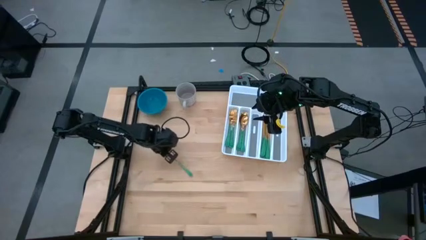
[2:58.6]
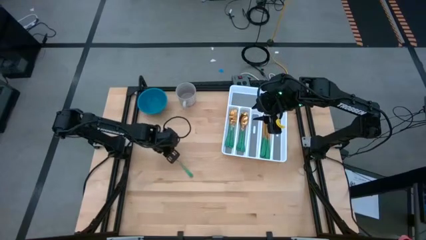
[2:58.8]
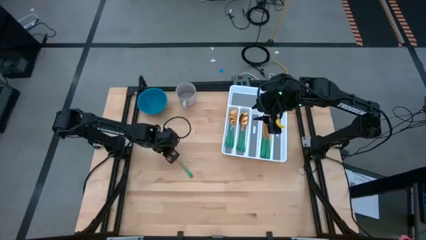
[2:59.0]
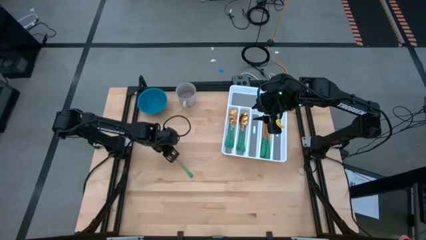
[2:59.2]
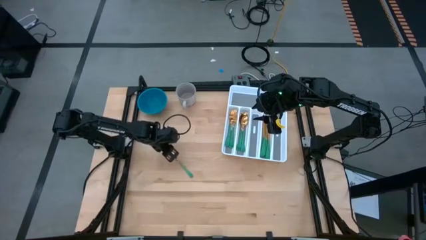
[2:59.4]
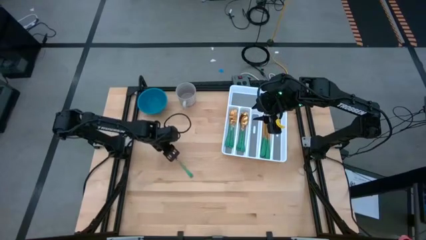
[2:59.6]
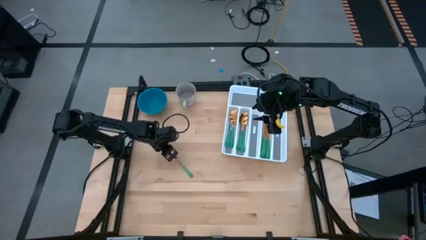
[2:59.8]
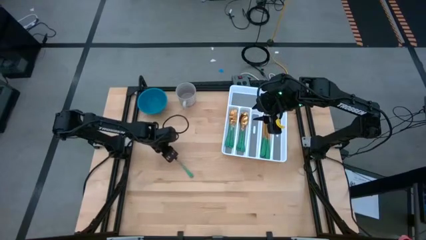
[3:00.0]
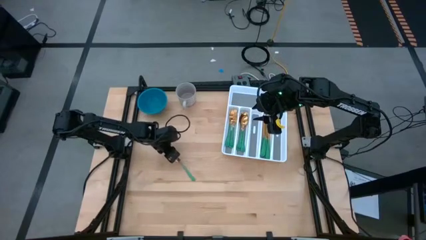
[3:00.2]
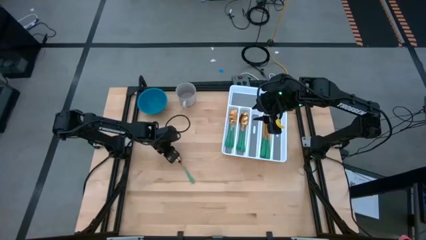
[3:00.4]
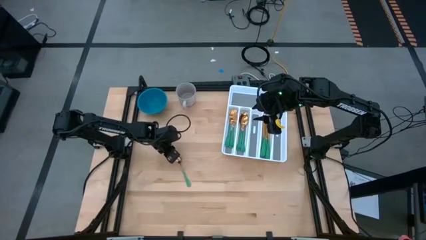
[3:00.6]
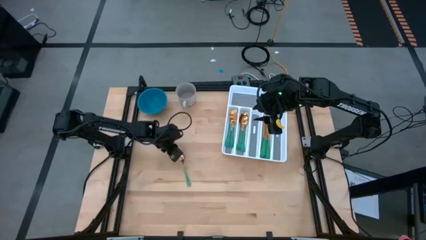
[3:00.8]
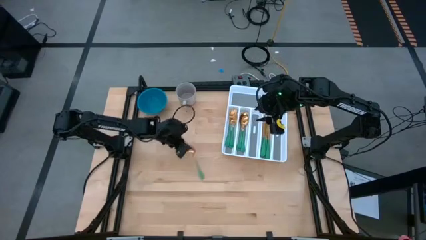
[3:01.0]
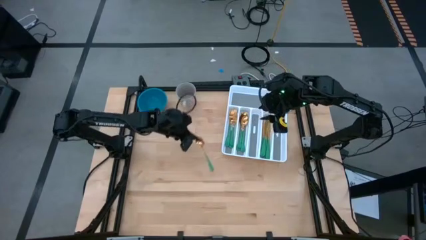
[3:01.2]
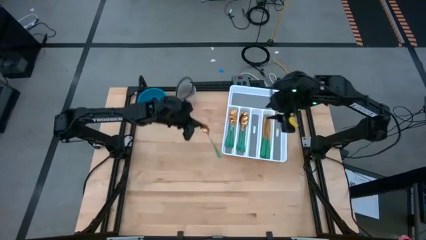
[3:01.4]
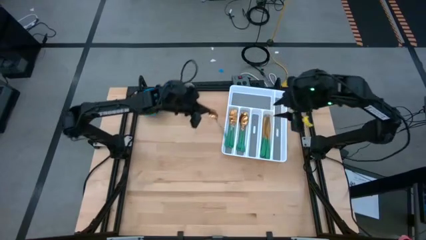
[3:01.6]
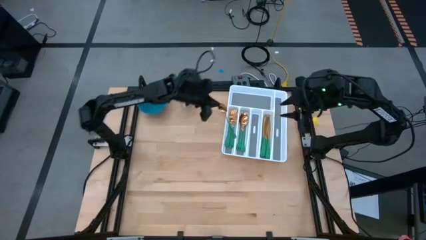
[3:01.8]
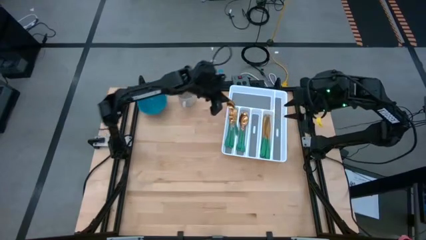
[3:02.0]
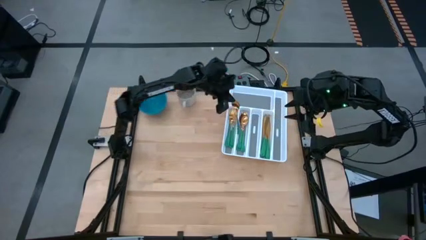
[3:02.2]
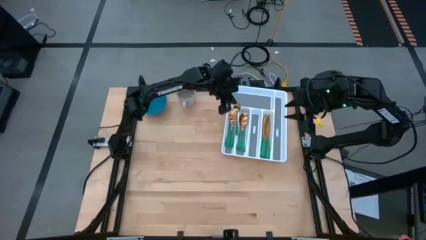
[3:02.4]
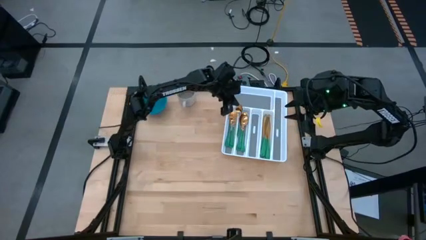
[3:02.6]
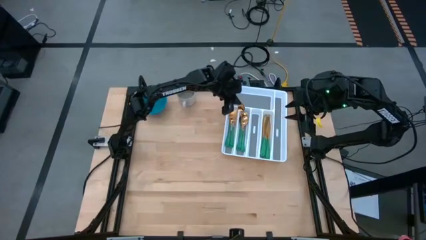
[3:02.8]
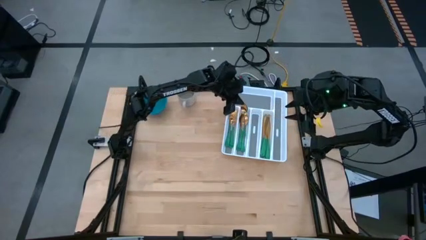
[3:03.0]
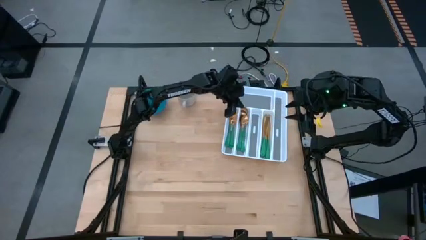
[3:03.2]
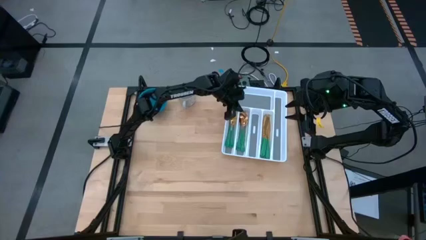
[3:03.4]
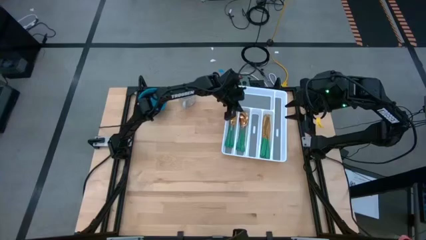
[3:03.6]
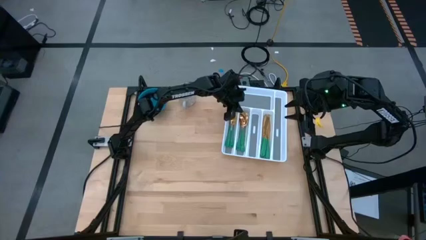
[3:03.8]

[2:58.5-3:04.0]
Task: Sort silverware
Put the green spoon into the white silverware organizer

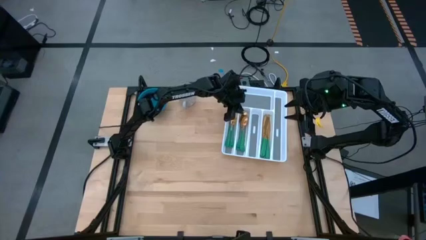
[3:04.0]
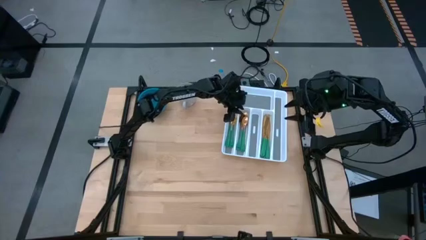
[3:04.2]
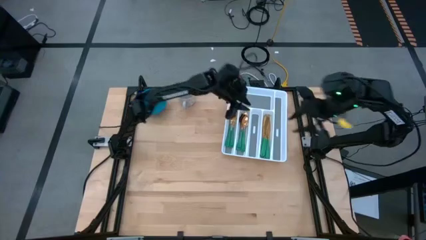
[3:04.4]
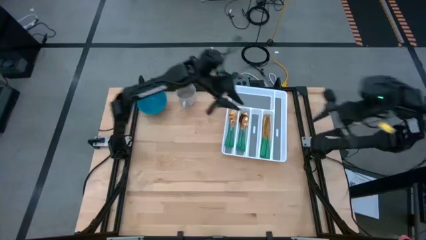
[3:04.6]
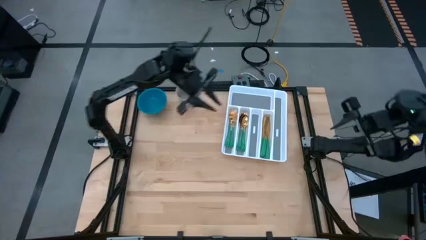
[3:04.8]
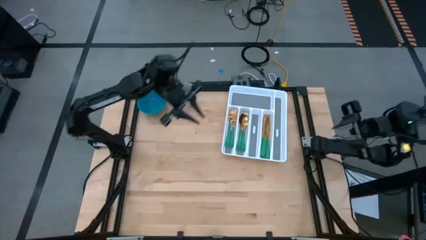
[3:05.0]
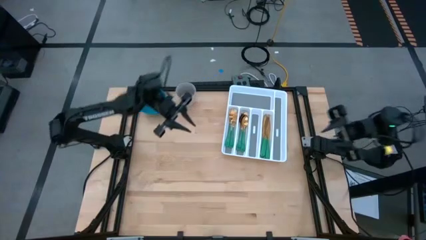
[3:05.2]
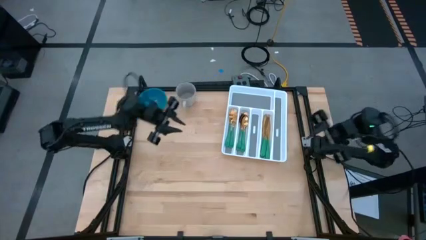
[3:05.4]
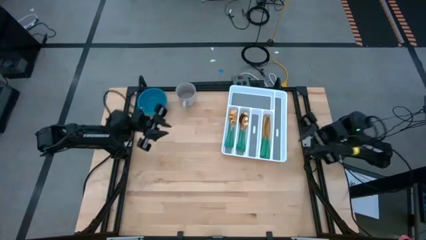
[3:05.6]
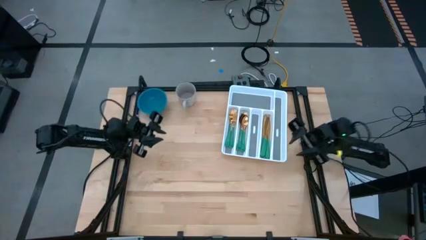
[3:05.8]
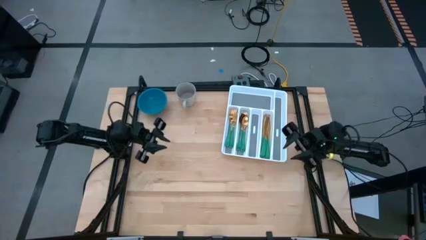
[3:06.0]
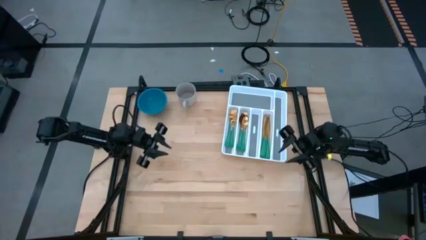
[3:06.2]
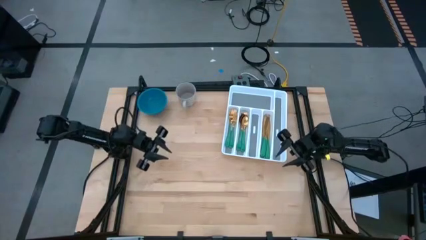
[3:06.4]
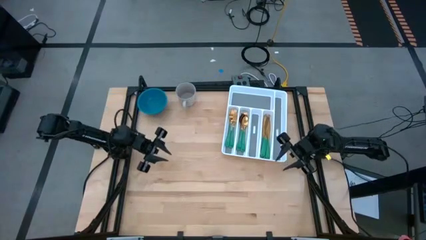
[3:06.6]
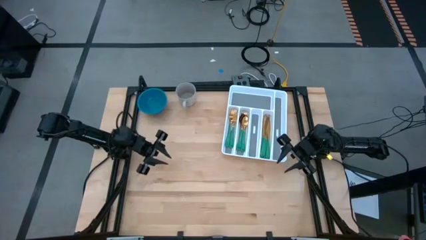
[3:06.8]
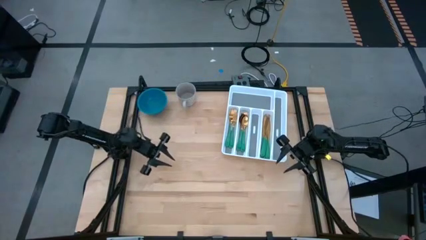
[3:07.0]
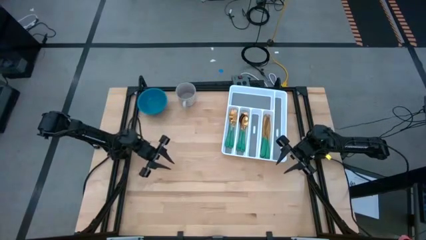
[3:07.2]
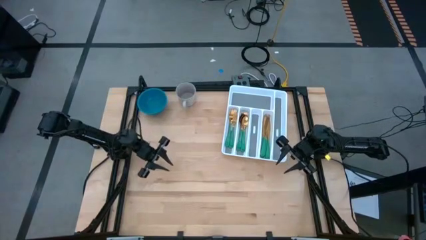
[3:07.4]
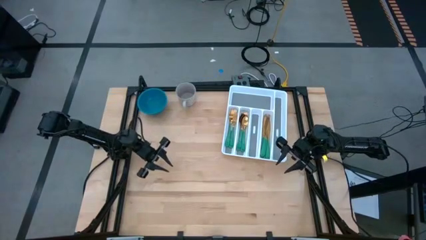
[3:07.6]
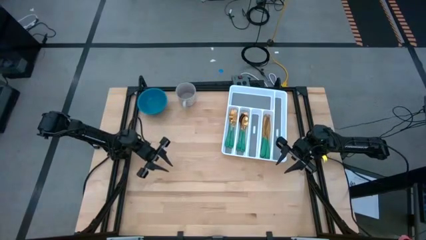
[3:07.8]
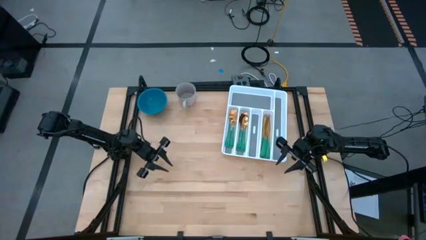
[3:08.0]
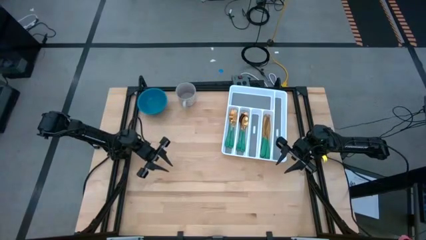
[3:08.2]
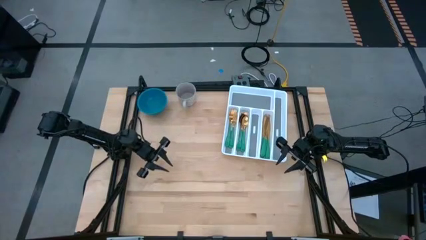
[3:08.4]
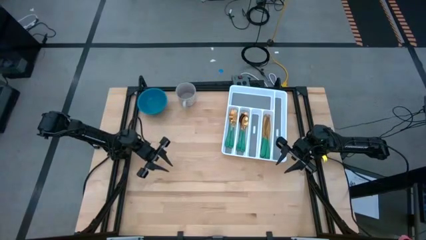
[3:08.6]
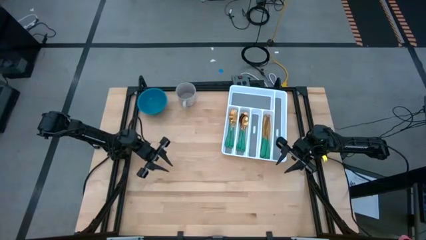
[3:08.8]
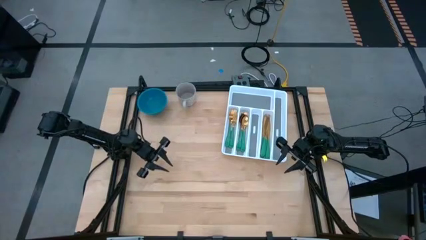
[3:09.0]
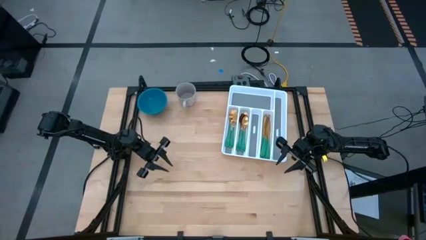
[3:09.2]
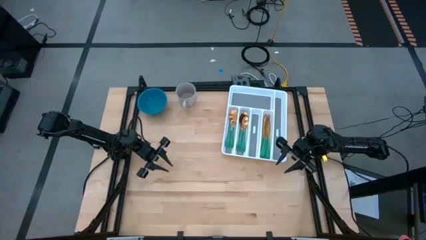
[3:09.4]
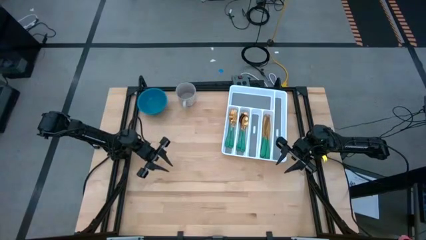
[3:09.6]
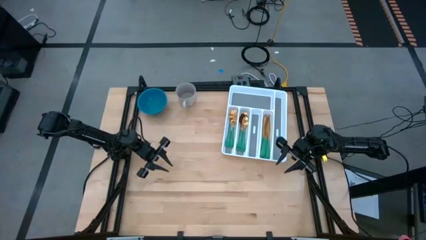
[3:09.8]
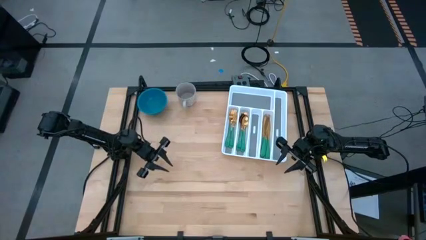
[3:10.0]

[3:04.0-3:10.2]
Return to Home Position

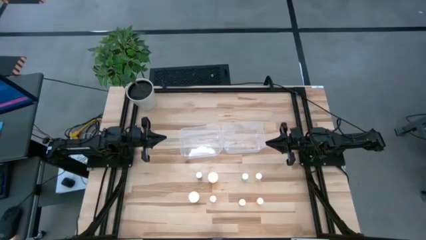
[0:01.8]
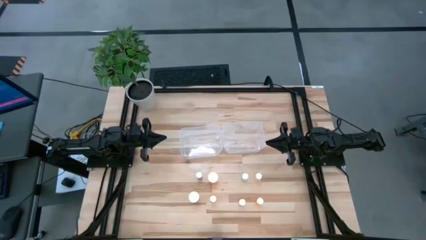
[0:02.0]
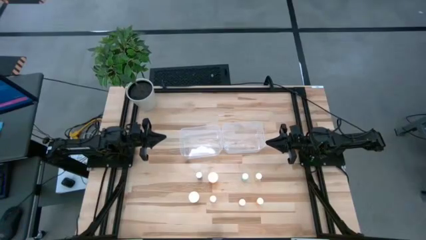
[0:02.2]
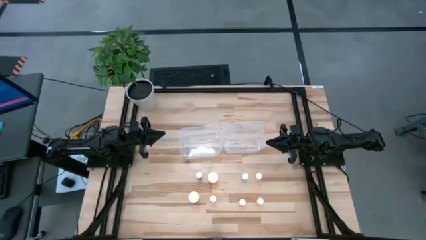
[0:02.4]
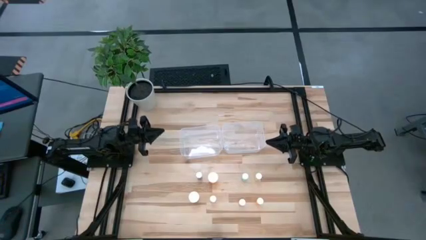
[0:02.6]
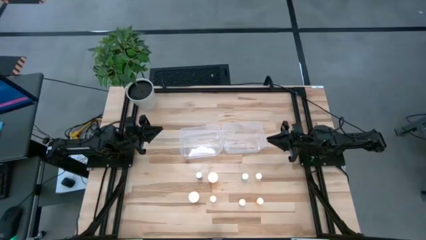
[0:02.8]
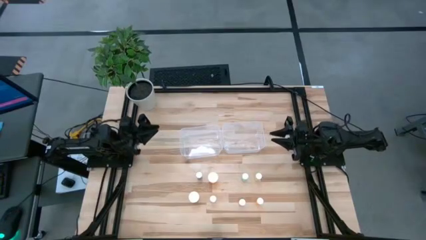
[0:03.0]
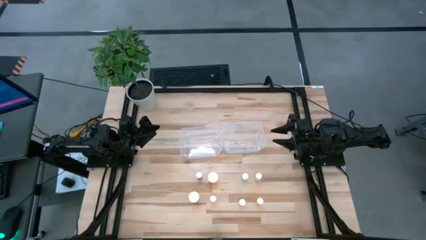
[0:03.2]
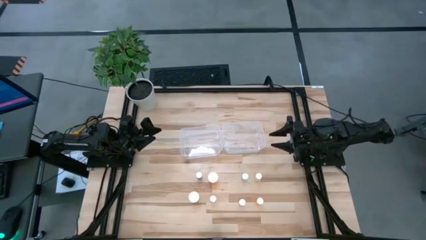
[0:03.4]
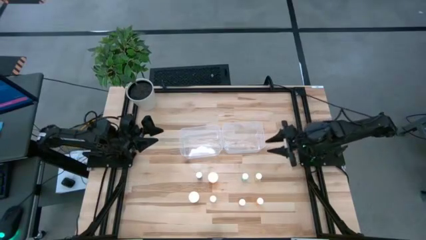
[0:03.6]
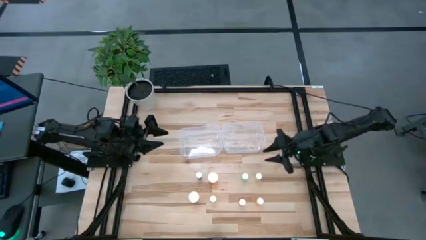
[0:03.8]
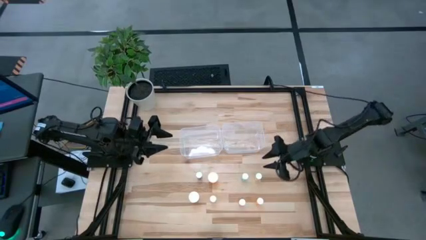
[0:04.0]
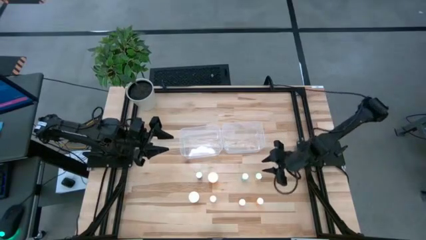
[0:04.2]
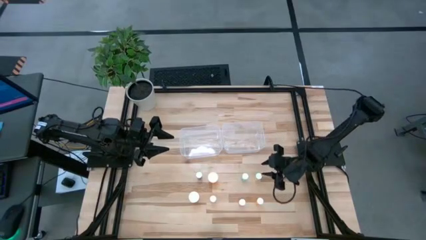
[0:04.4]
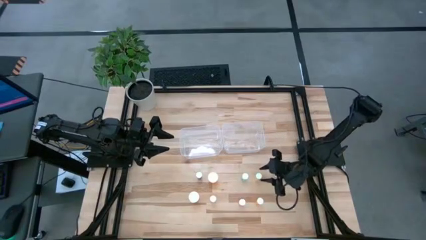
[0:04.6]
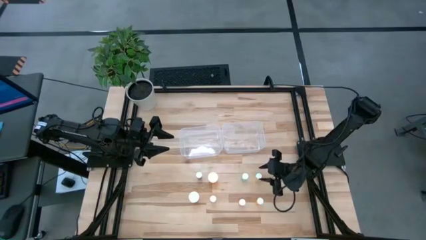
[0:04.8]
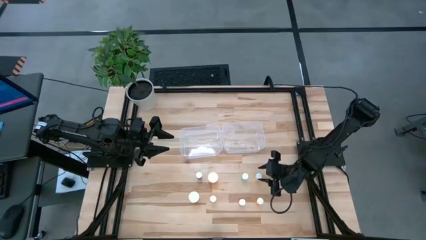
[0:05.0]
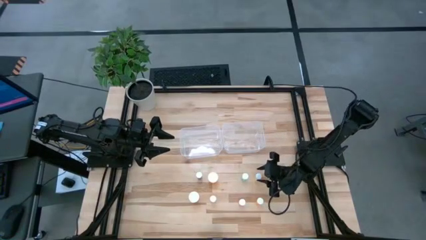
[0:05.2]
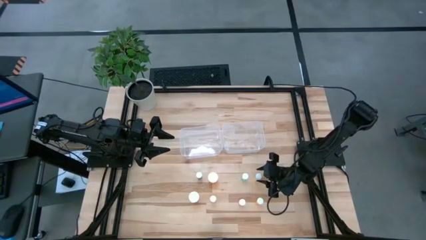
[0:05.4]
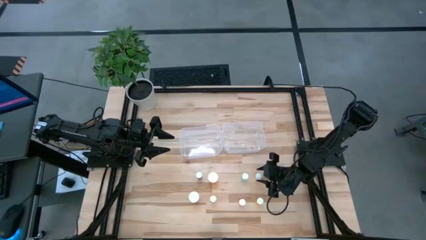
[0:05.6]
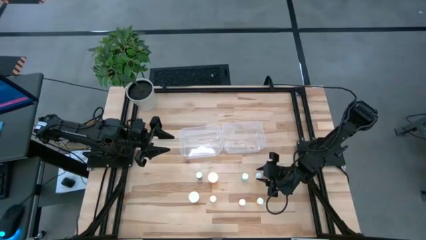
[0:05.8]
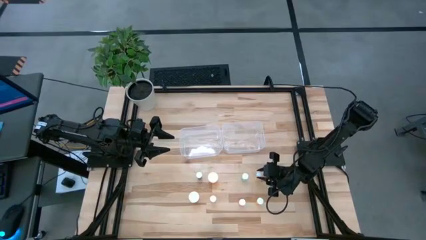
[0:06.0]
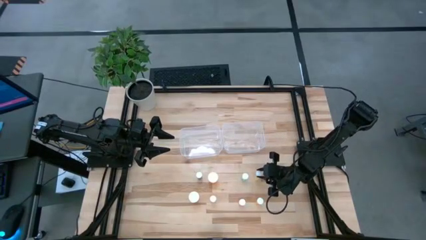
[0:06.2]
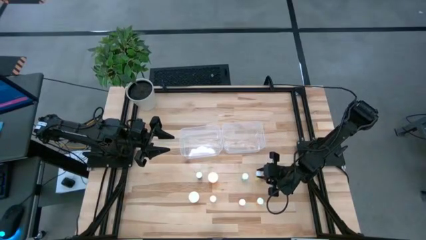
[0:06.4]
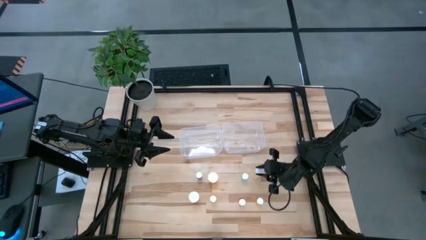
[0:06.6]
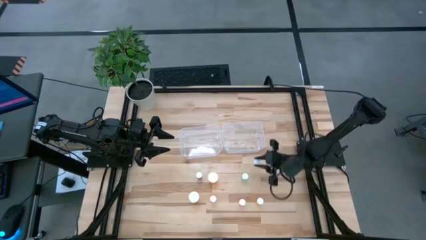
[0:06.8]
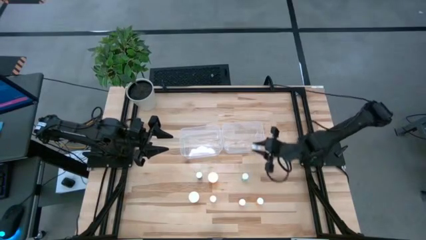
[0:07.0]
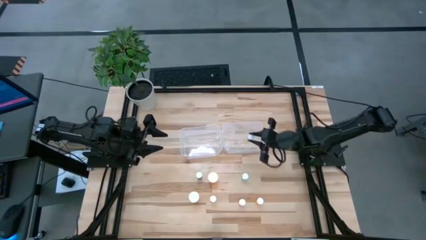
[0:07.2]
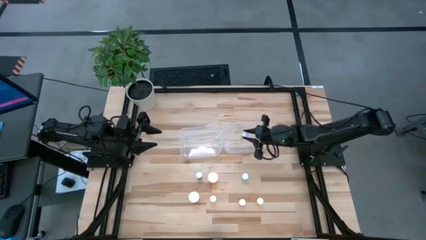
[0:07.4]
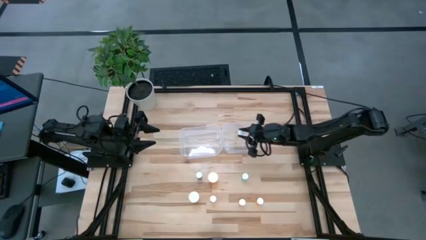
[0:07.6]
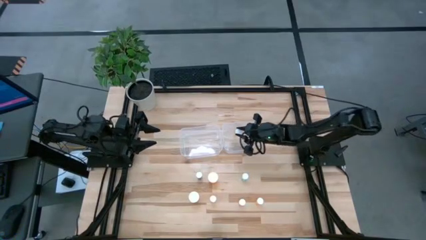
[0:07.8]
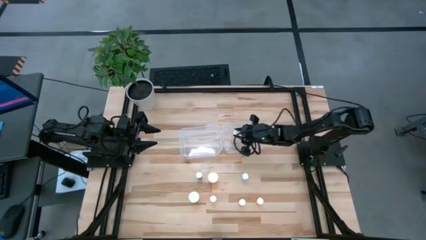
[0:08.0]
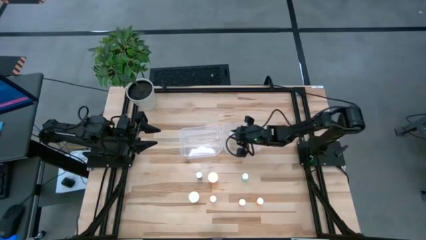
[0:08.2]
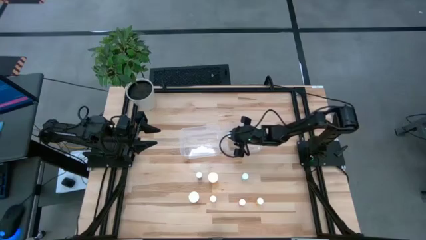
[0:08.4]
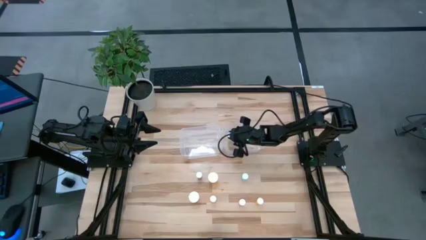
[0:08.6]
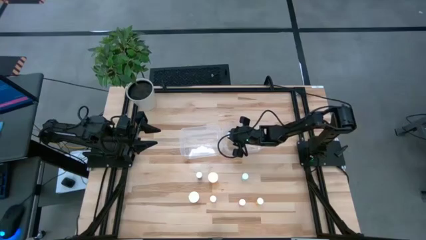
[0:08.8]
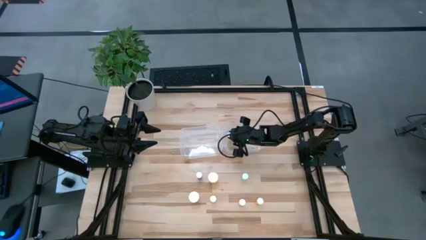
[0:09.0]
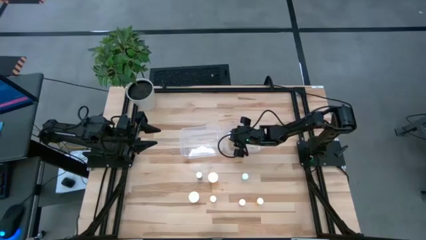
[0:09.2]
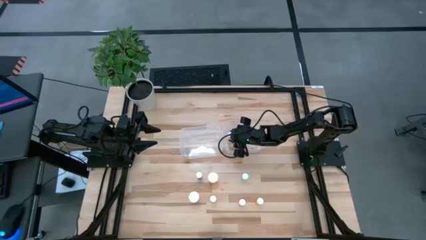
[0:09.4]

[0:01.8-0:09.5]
Task: Pick and place medicine bottles into bin by pill shape (circle, oval)
Put the yellow pill bottle into the right transparent bin
